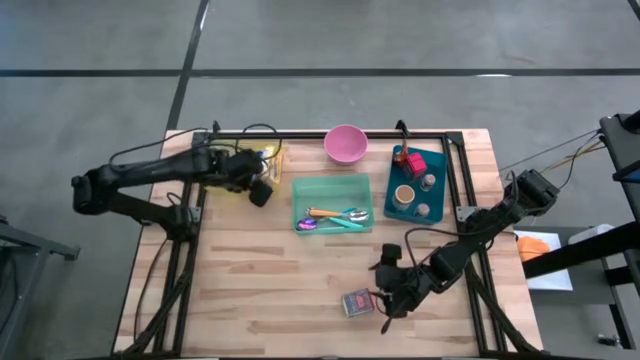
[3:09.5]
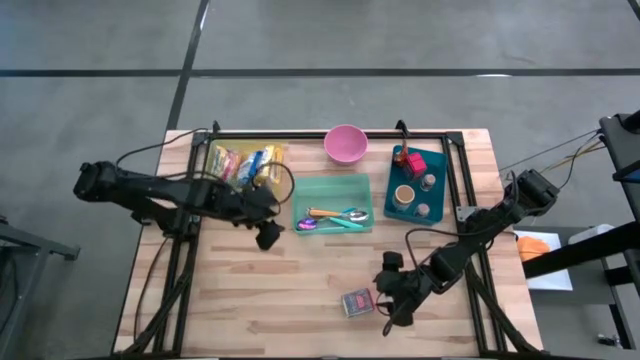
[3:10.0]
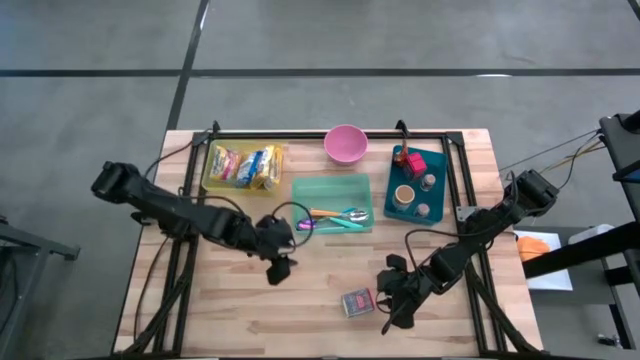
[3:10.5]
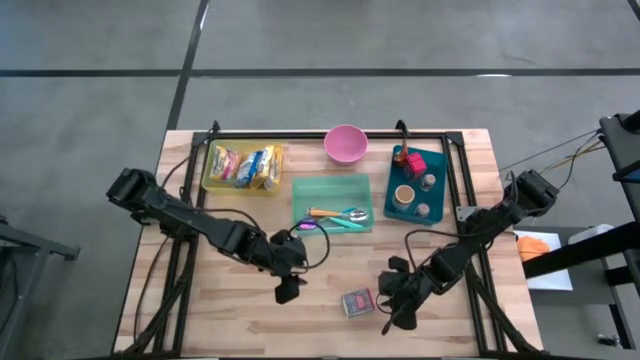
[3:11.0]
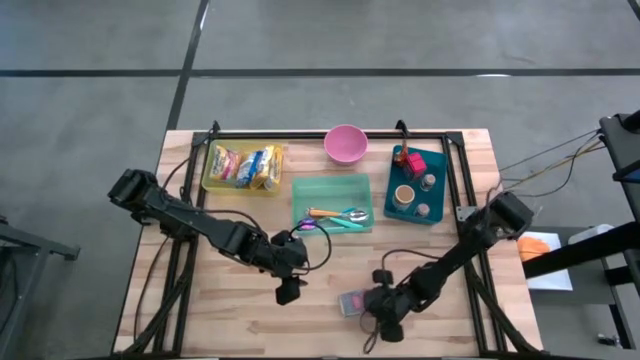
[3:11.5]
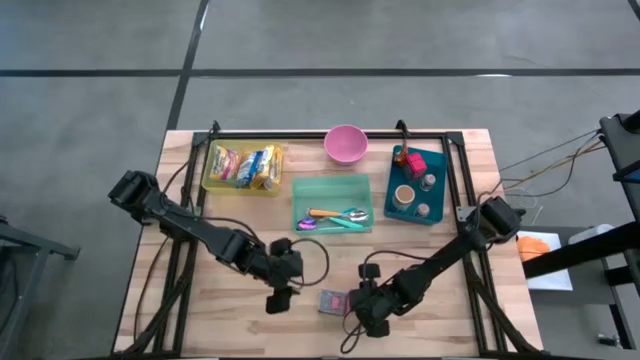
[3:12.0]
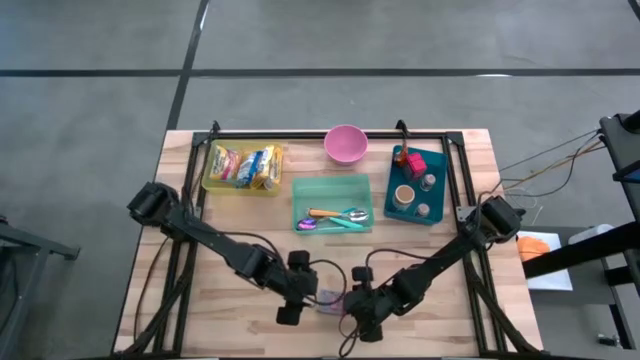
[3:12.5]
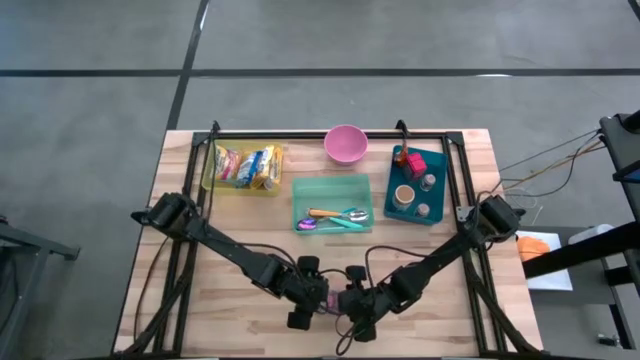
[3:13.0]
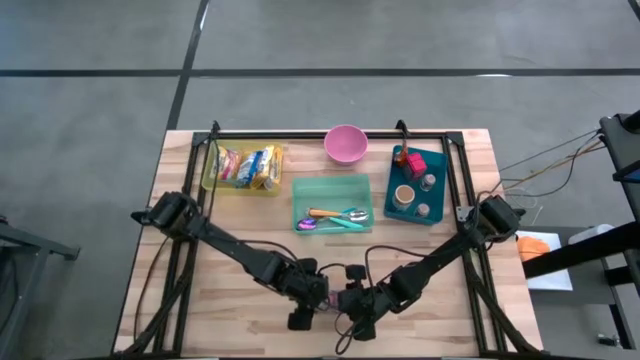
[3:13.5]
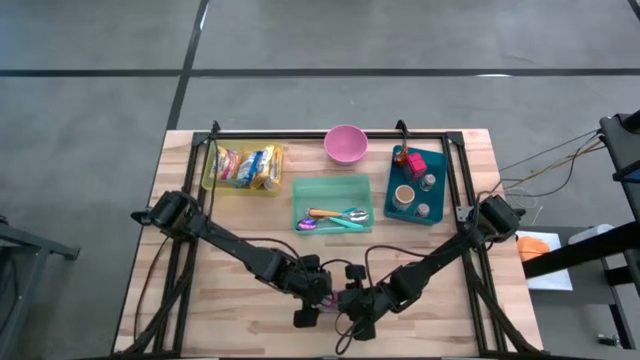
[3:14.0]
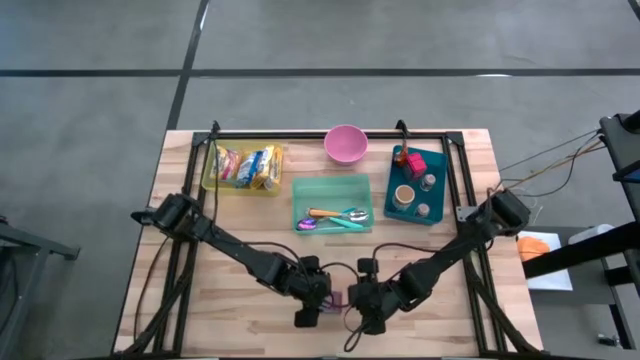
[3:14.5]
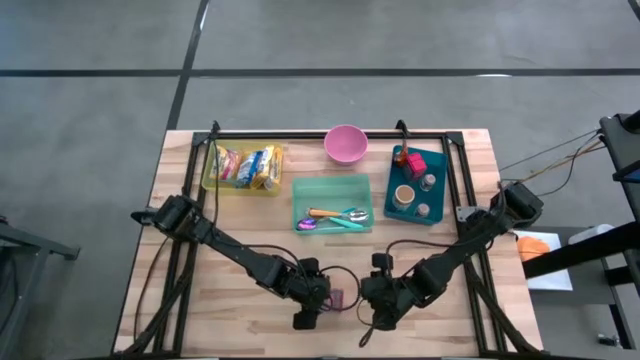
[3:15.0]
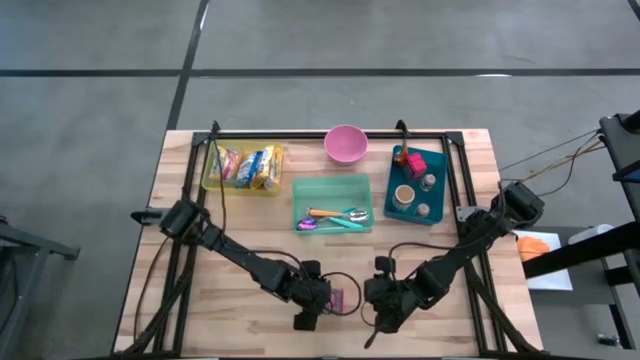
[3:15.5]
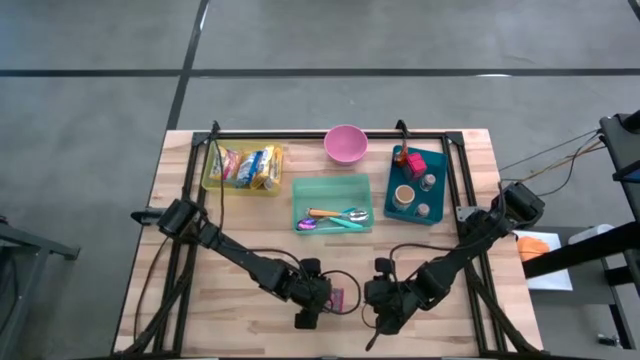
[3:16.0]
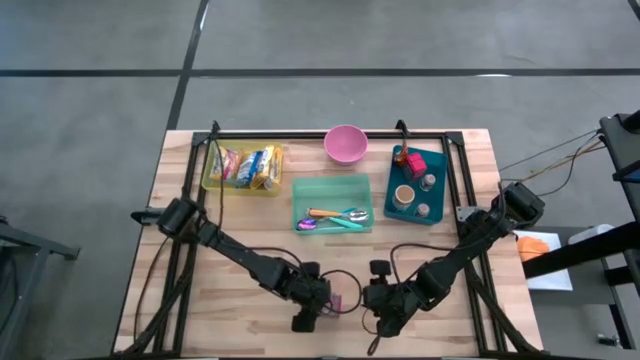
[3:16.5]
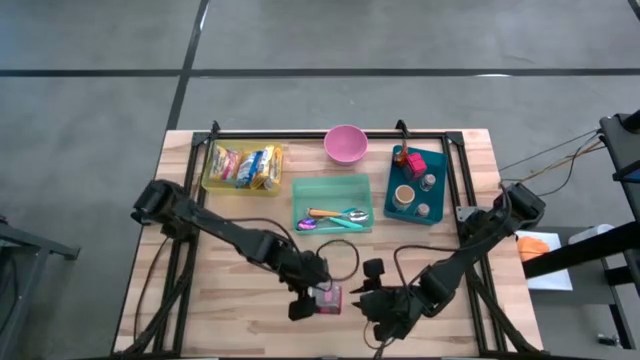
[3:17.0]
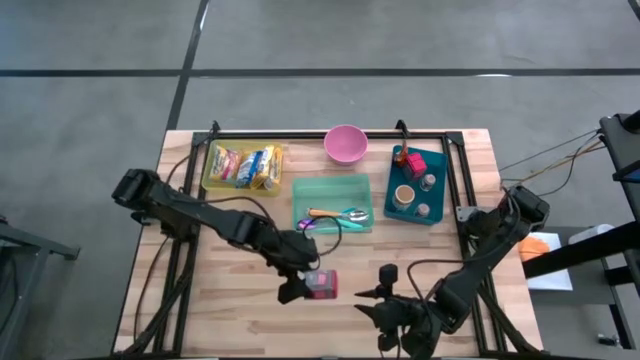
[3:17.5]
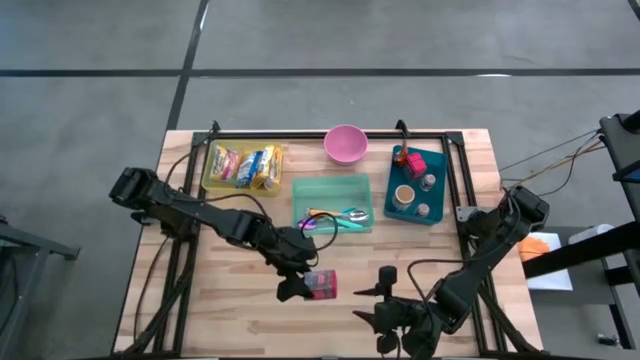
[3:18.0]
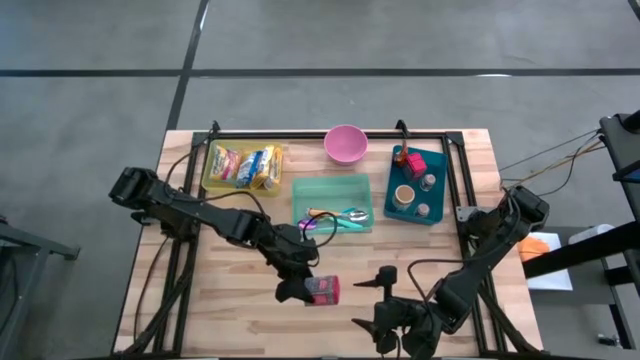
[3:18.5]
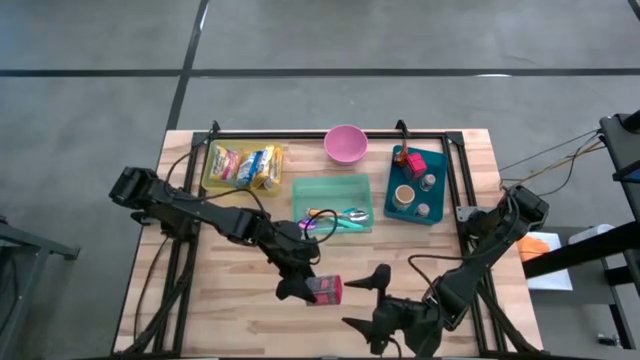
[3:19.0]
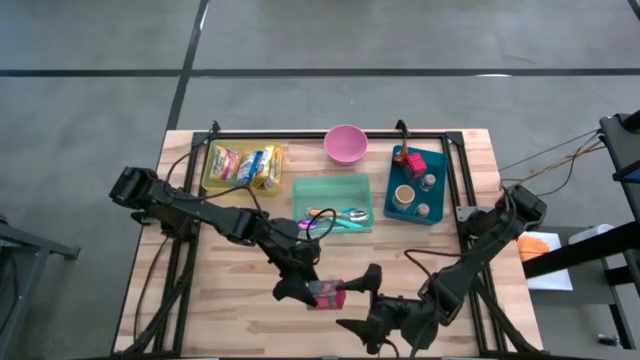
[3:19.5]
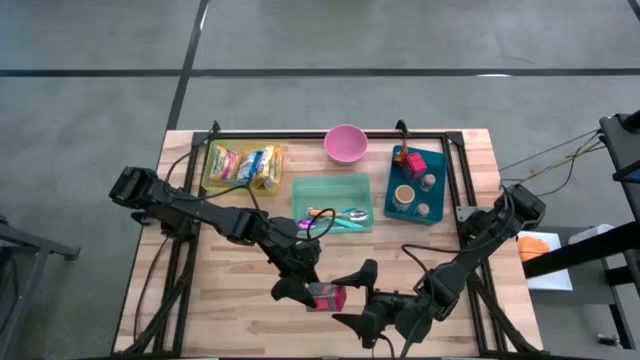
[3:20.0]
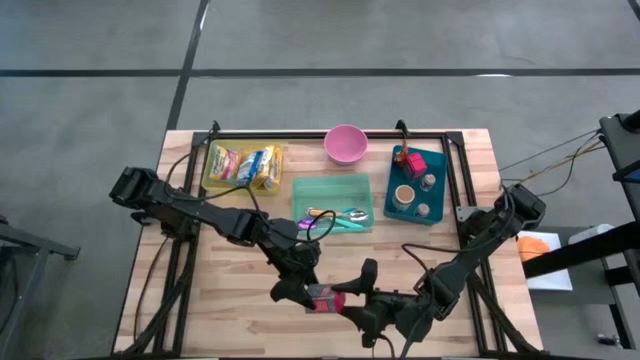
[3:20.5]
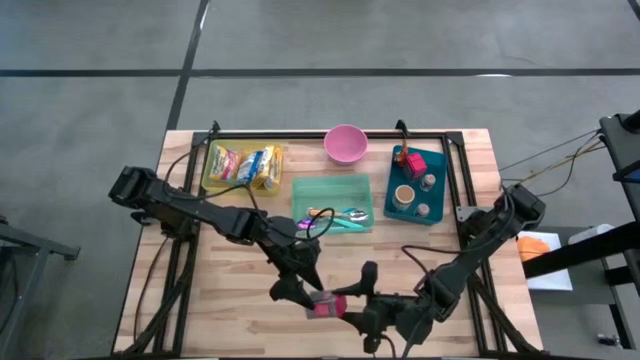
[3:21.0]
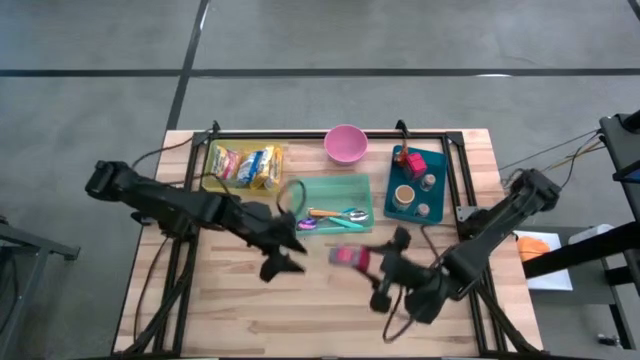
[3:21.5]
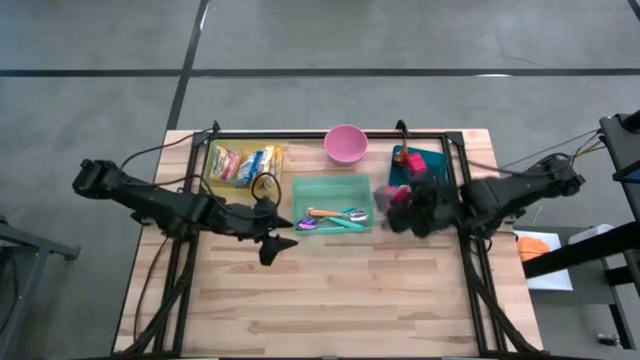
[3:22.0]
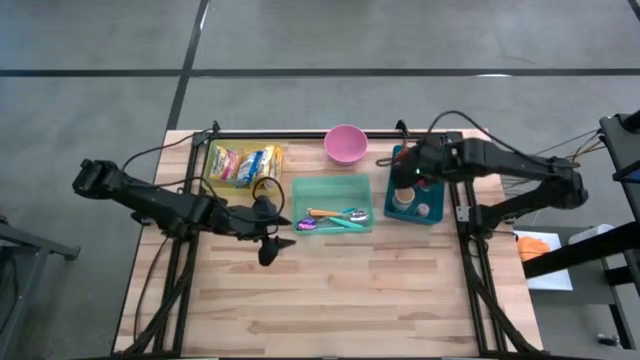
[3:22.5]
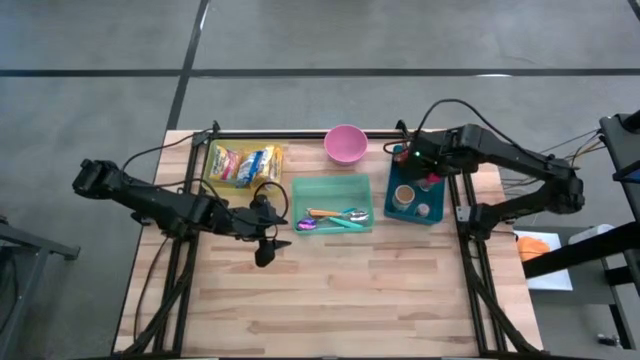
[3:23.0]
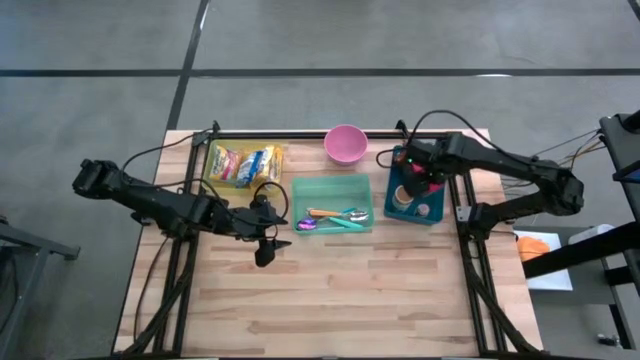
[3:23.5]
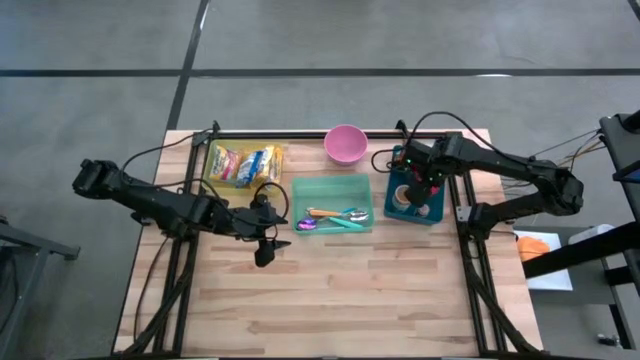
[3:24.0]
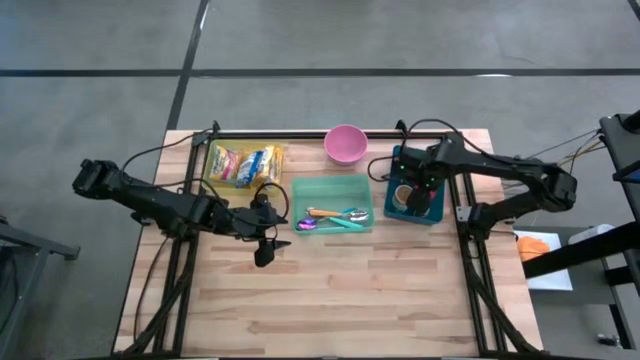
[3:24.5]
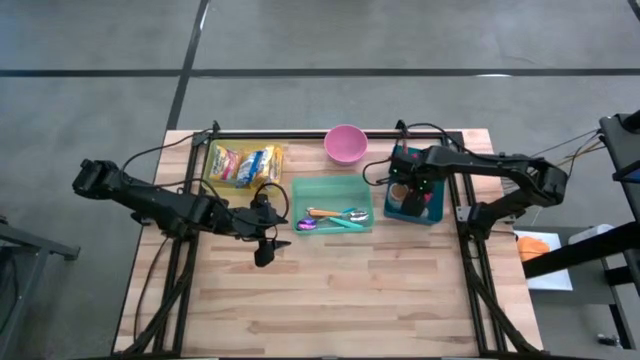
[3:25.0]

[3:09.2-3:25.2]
Put the red seasoning can into the blue bin
